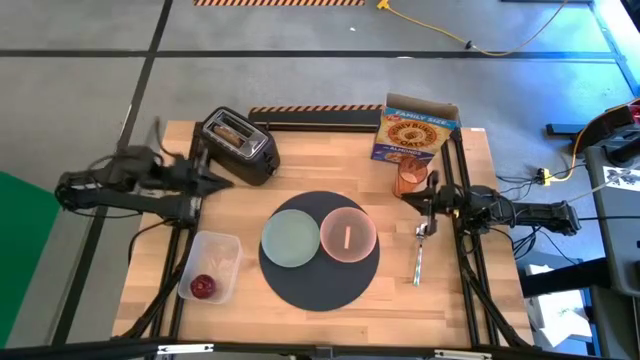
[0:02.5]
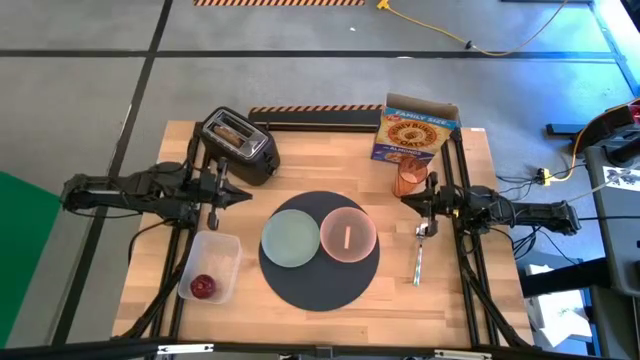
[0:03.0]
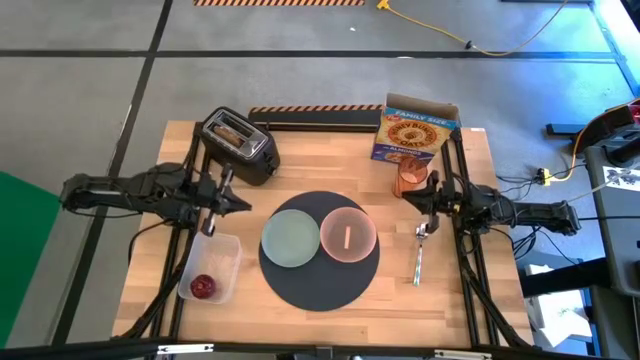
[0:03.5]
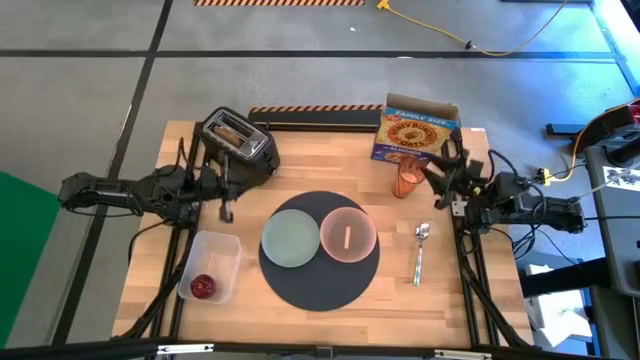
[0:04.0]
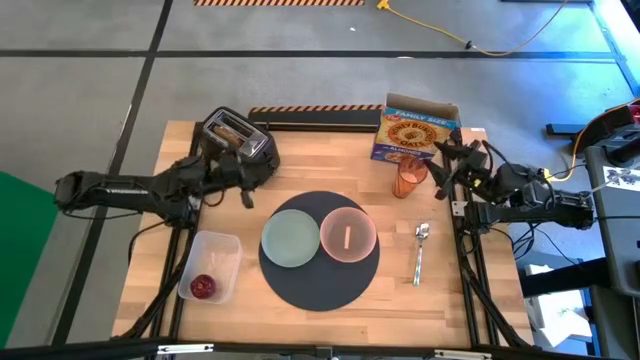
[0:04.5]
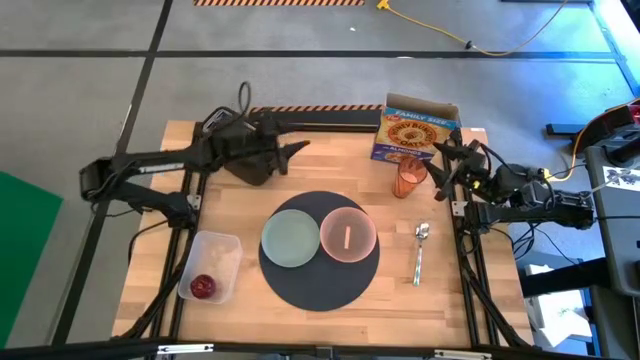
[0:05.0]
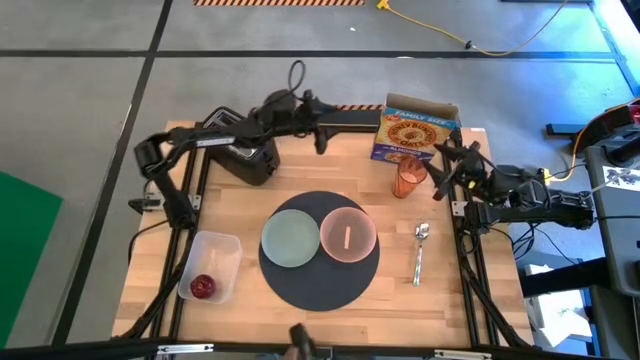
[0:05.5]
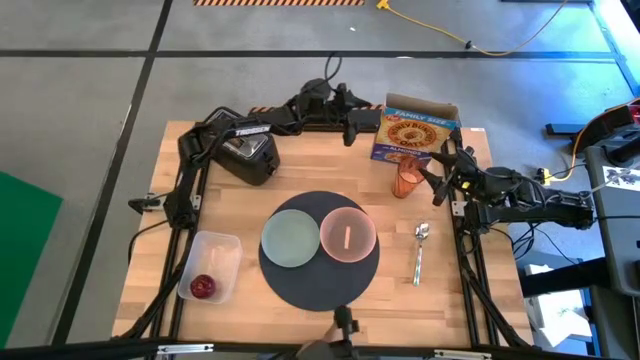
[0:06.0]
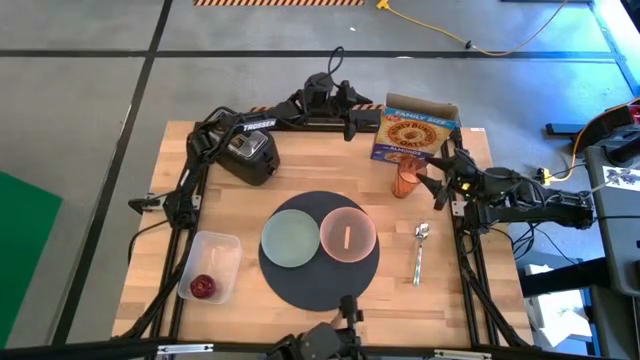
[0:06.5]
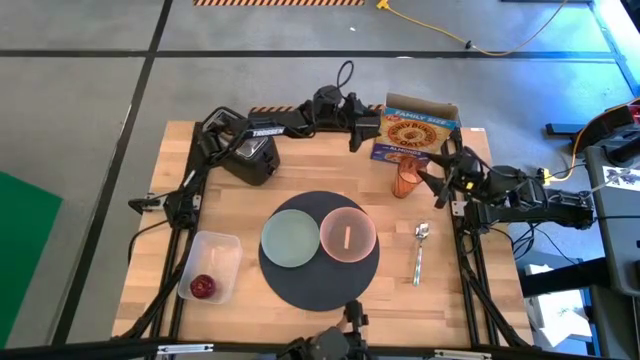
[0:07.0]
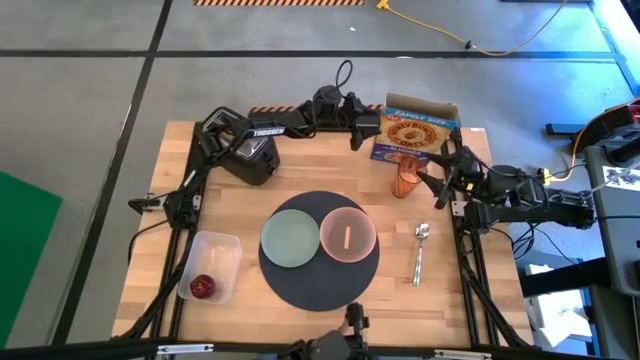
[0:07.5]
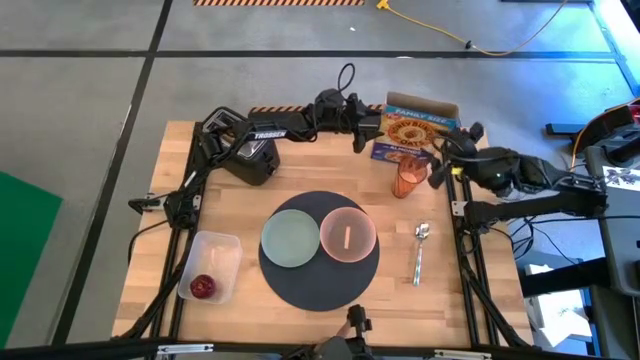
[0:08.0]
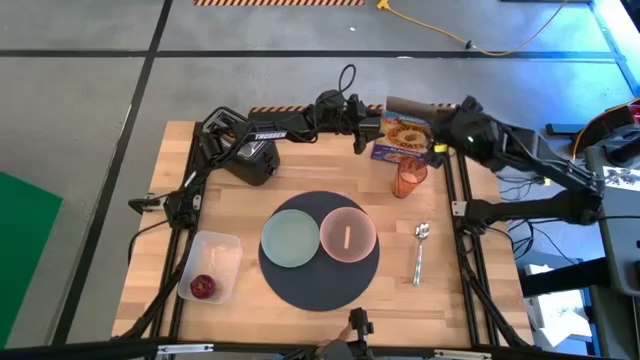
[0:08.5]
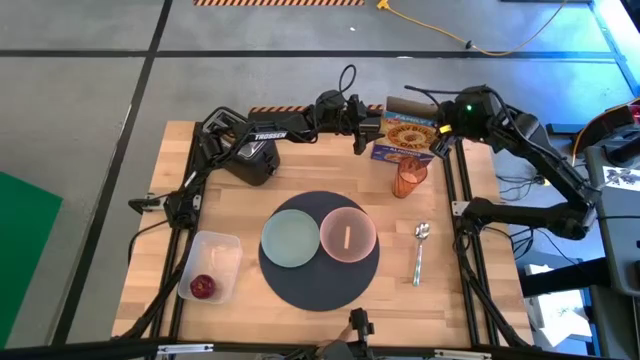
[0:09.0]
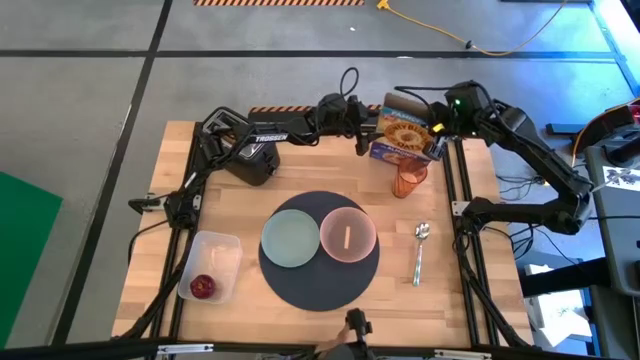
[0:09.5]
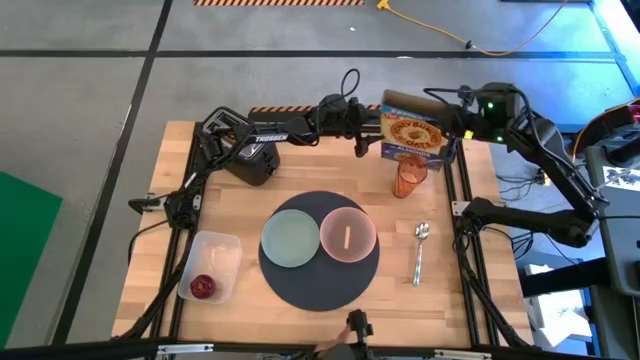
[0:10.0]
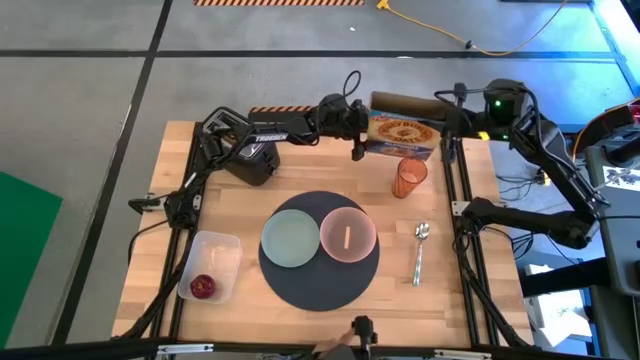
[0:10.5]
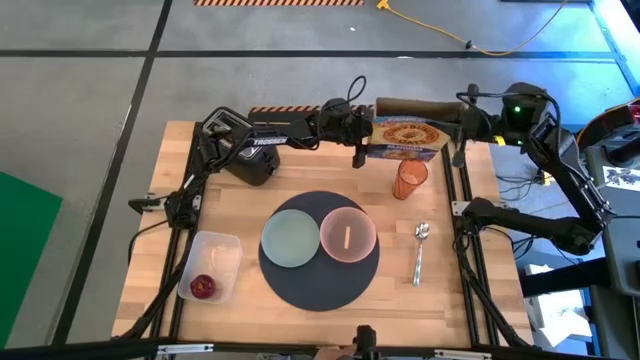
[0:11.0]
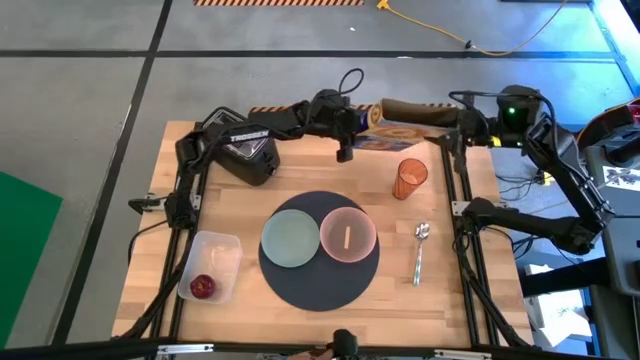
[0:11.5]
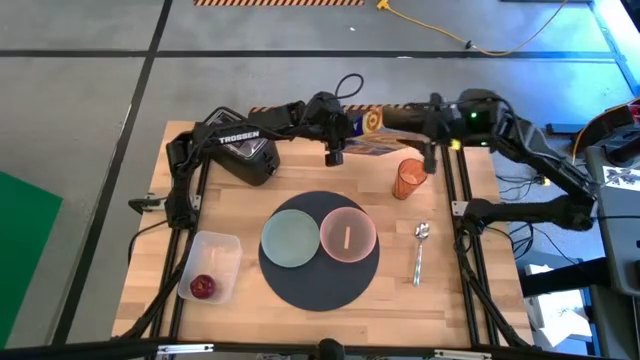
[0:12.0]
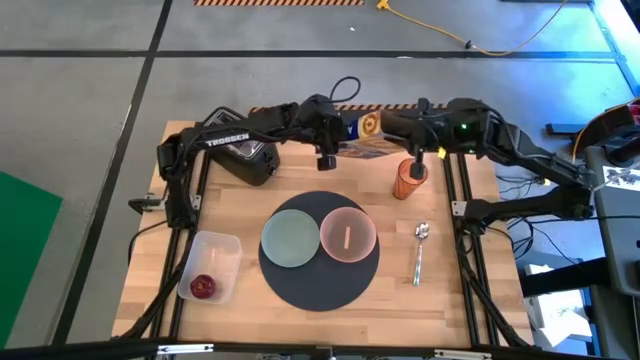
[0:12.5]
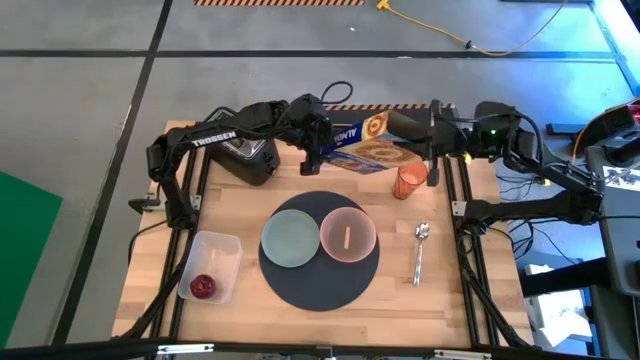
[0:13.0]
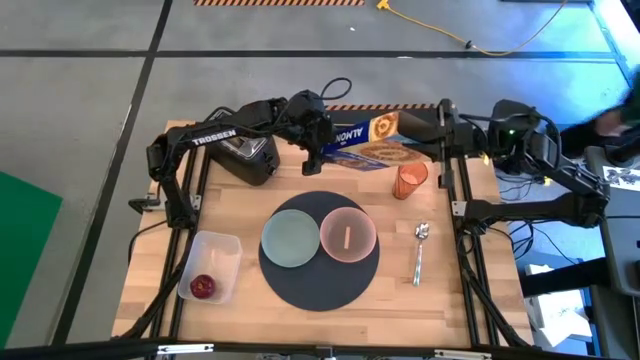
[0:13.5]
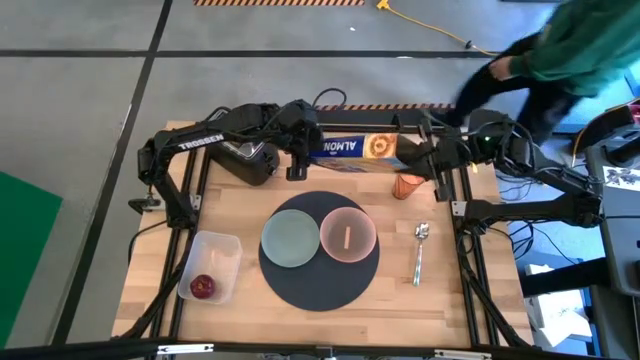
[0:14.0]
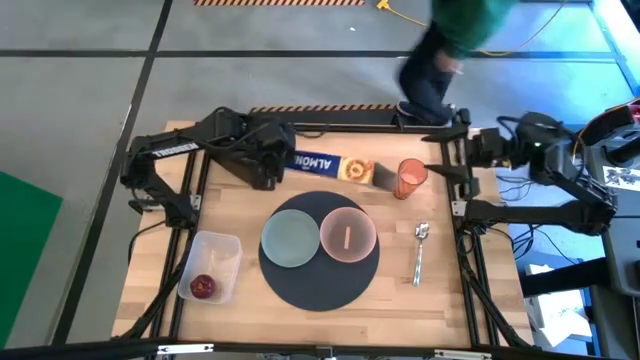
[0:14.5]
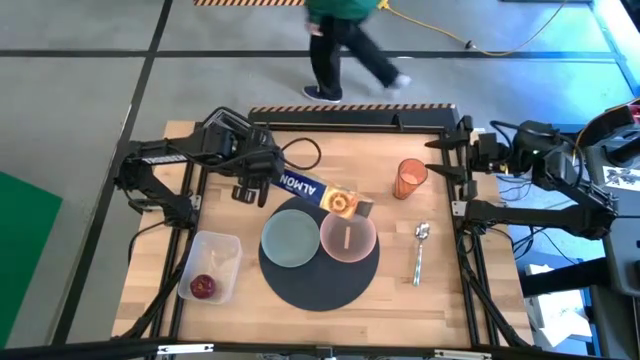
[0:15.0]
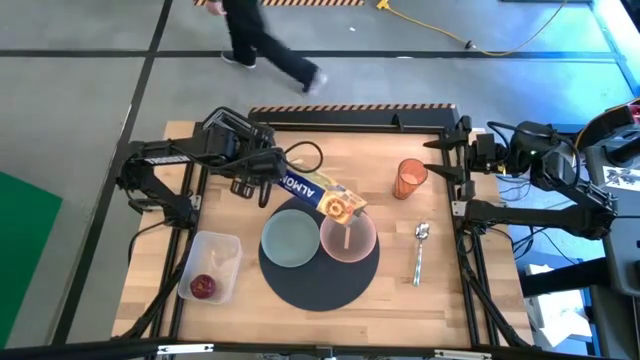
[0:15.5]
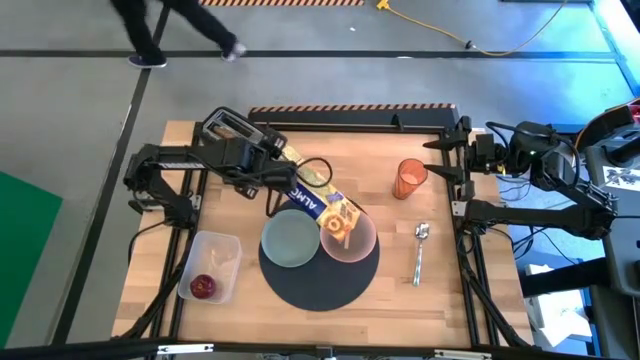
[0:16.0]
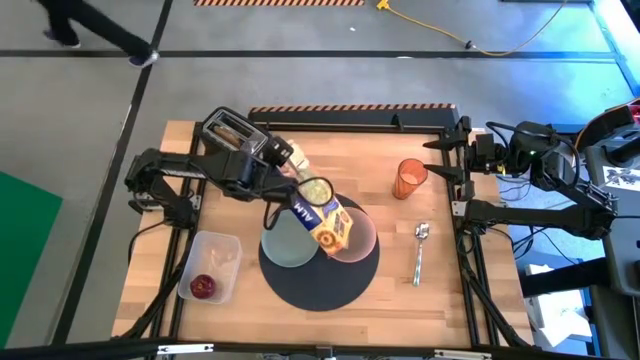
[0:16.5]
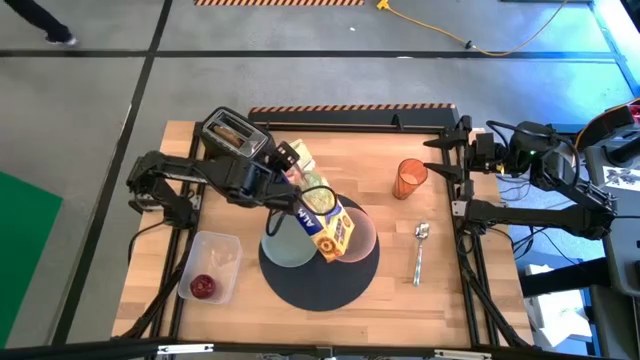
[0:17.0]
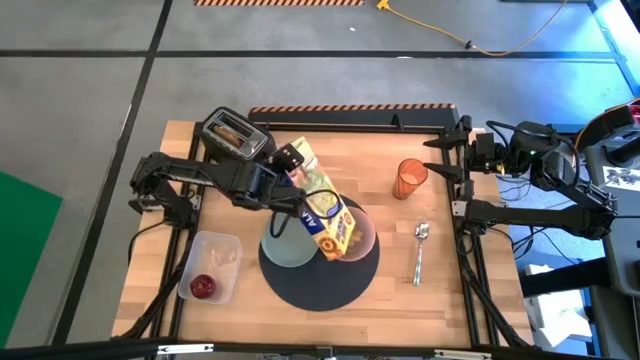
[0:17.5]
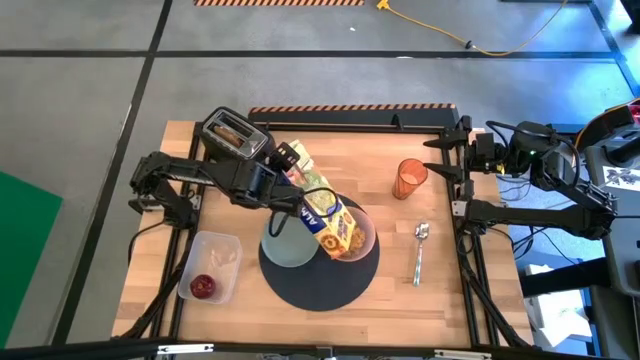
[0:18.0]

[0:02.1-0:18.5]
Task: Arrange a breakfast setting
Pour the cereal into the light pink bowl
